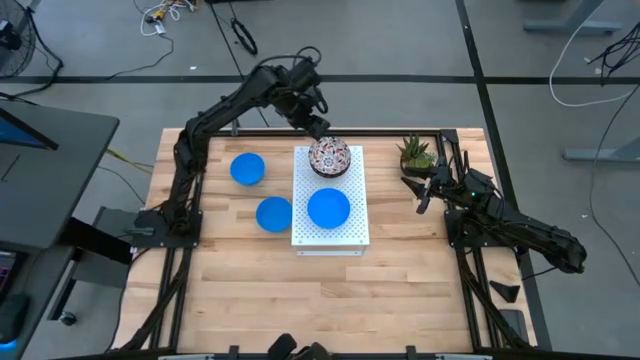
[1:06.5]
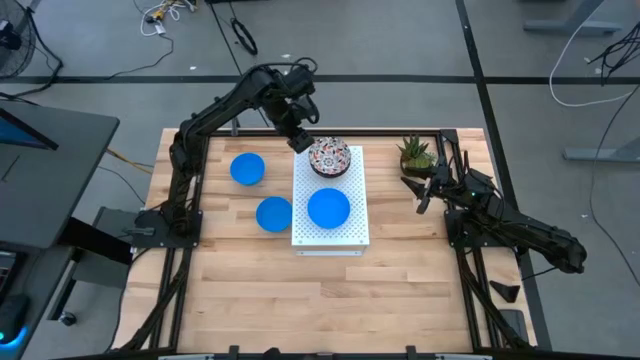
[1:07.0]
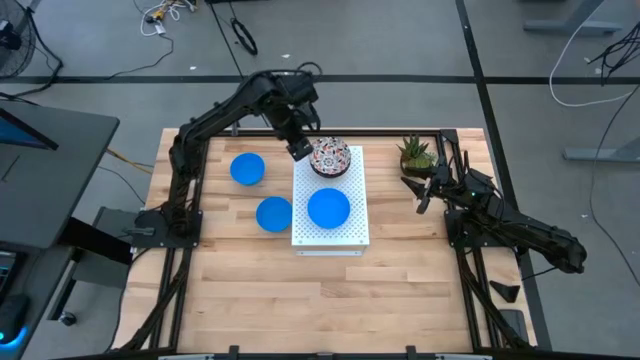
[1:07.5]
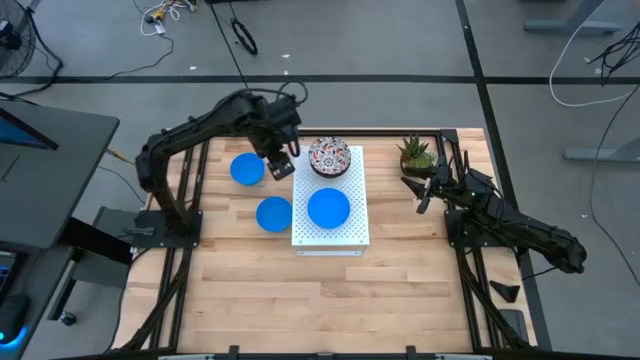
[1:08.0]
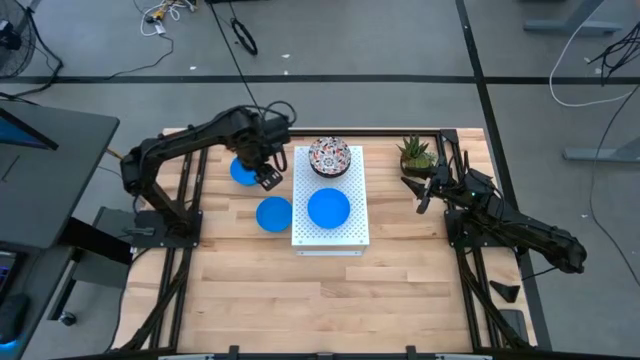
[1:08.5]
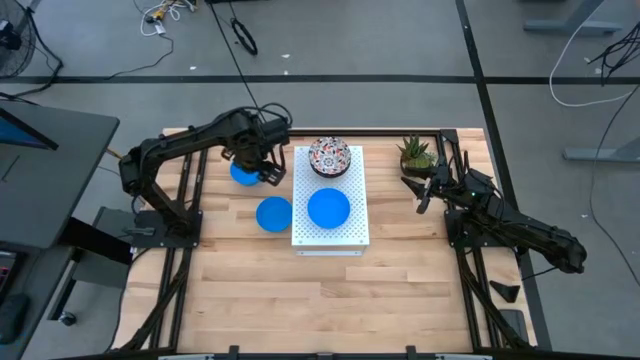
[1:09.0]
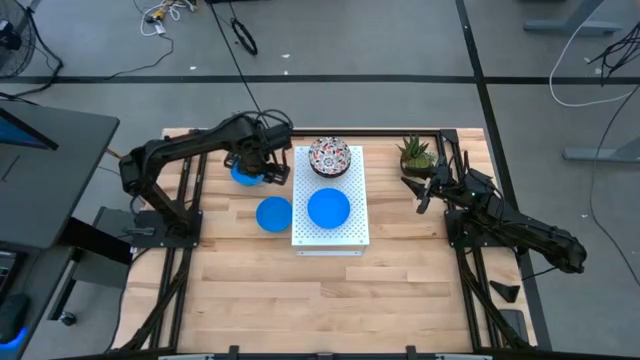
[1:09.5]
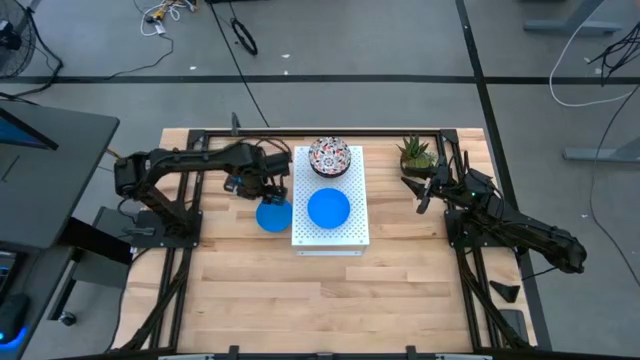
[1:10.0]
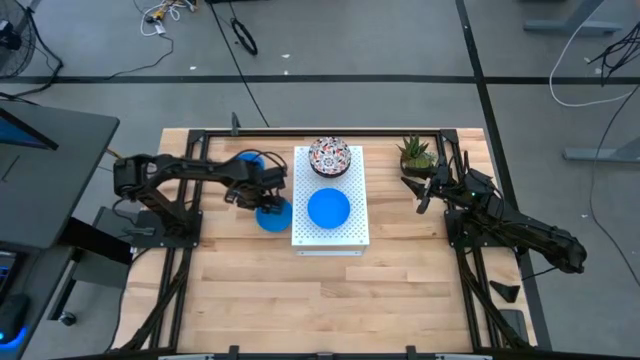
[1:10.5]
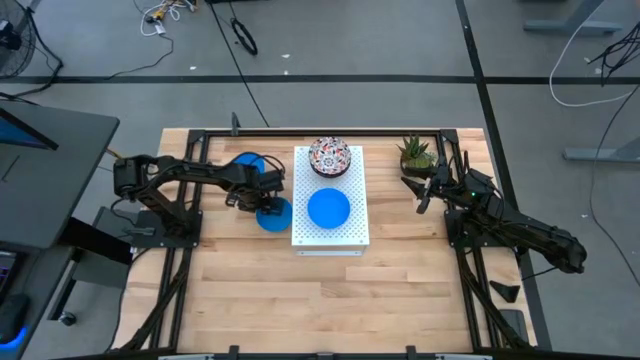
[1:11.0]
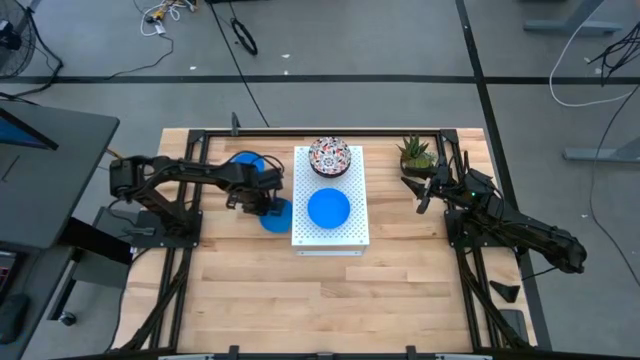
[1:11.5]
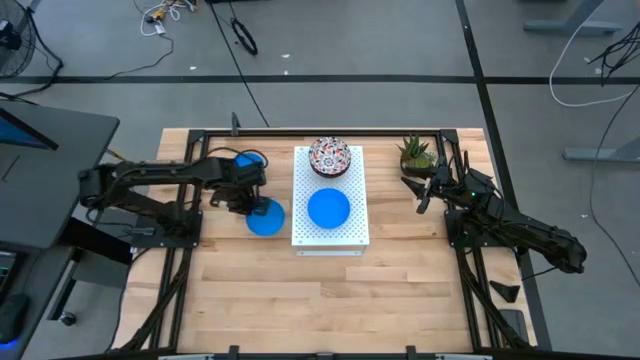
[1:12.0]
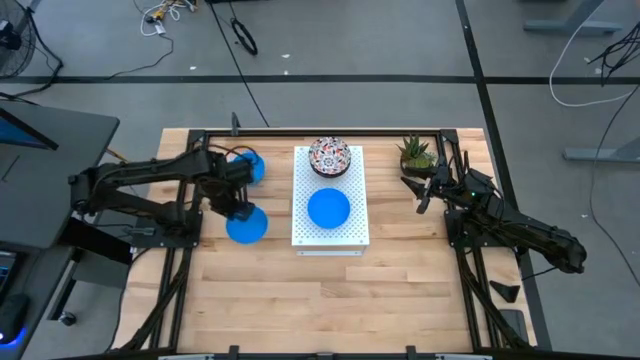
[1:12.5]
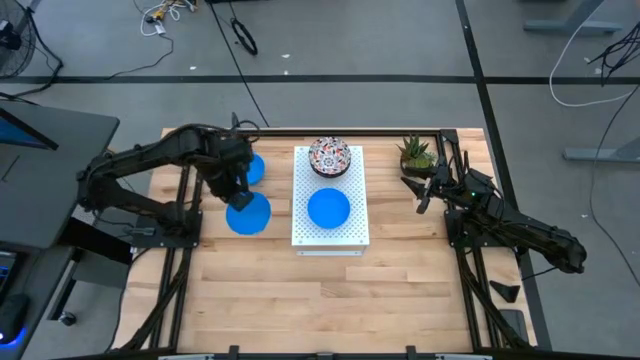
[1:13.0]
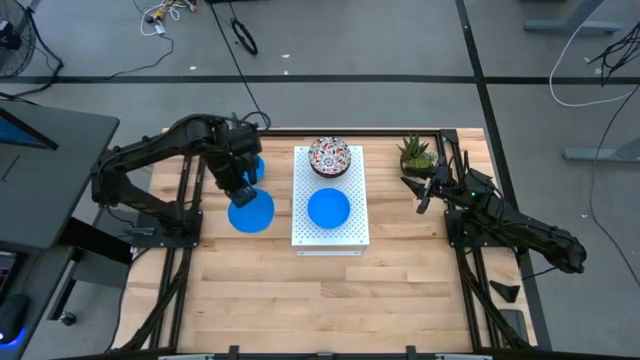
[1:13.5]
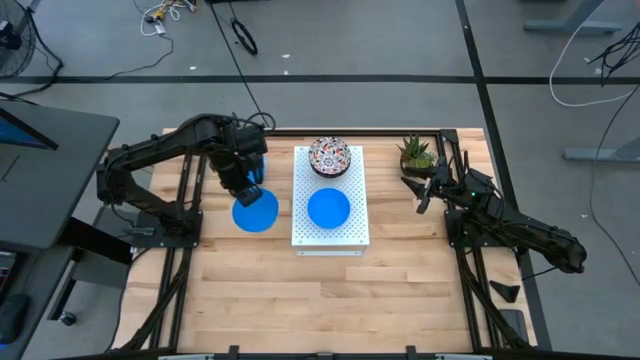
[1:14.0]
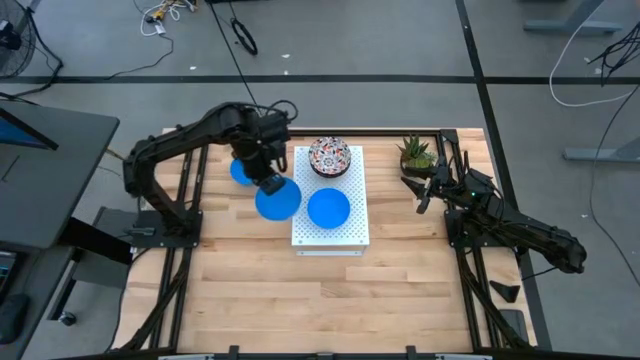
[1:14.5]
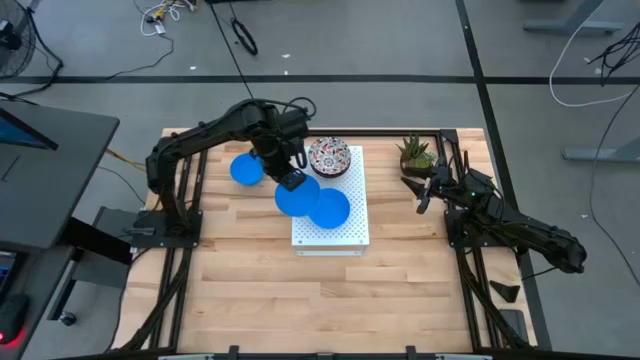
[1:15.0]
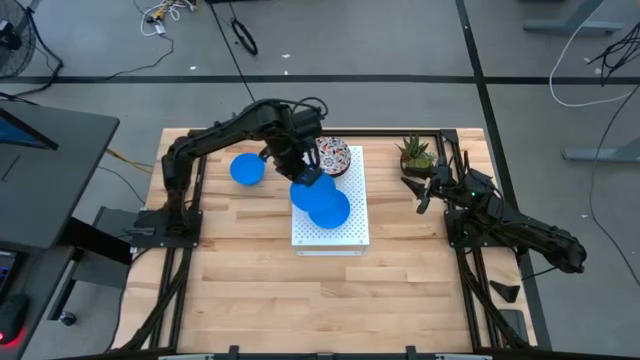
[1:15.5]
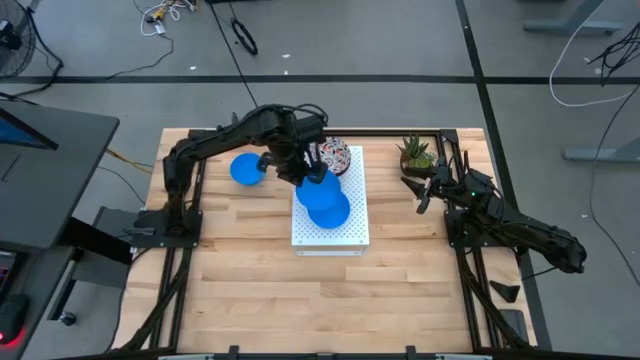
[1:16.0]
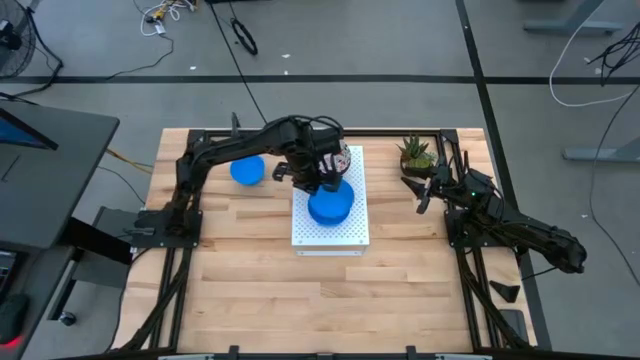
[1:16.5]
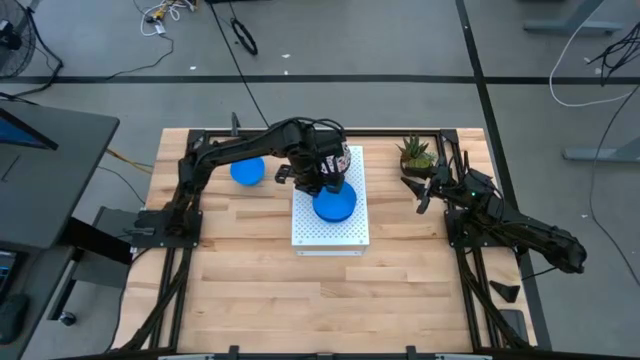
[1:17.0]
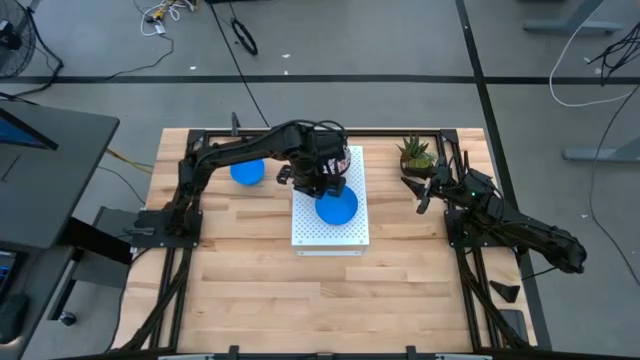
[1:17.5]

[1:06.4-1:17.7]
Task: Pick & Place Mini bowls
Stack the bottom blue bowl on top of the other blue bowl on the shelf

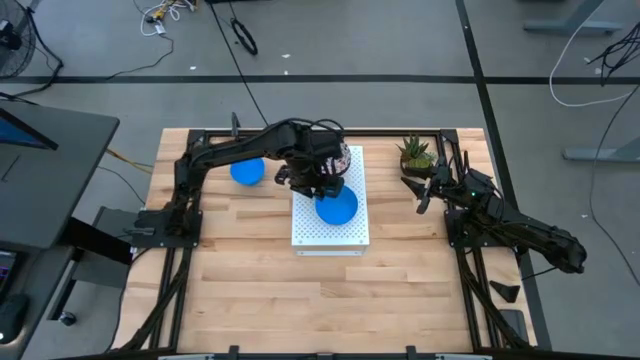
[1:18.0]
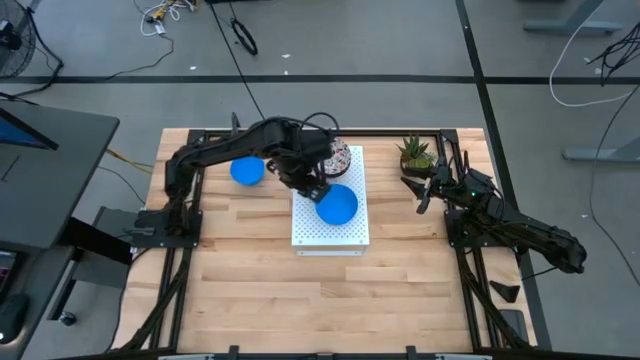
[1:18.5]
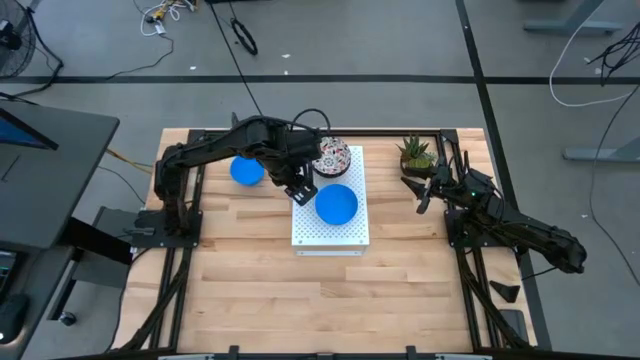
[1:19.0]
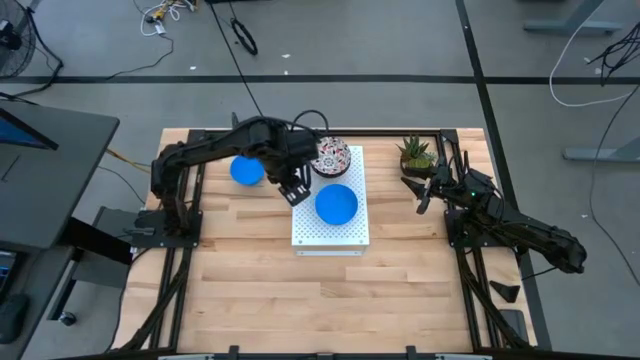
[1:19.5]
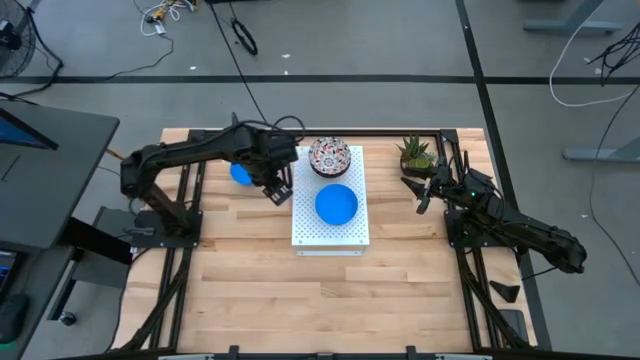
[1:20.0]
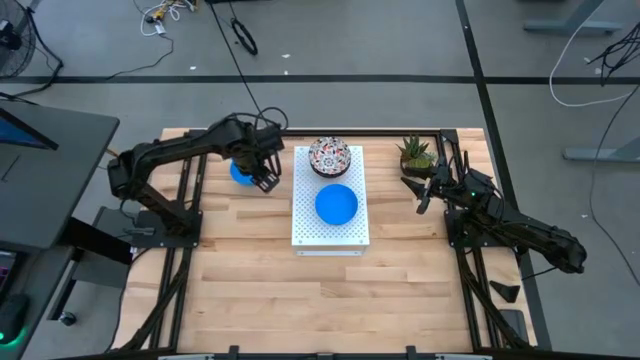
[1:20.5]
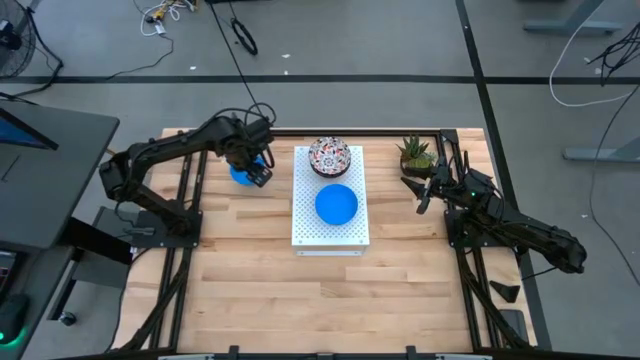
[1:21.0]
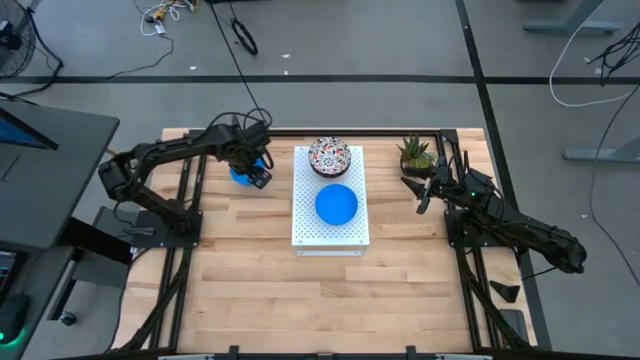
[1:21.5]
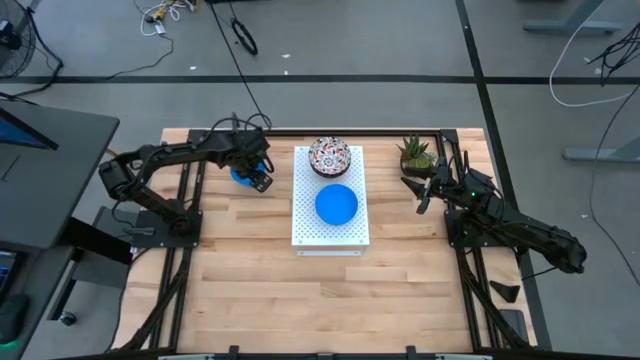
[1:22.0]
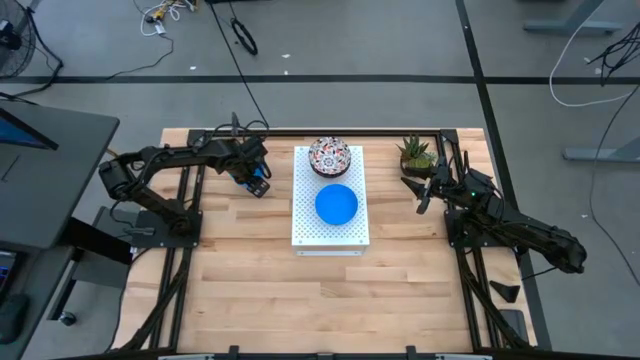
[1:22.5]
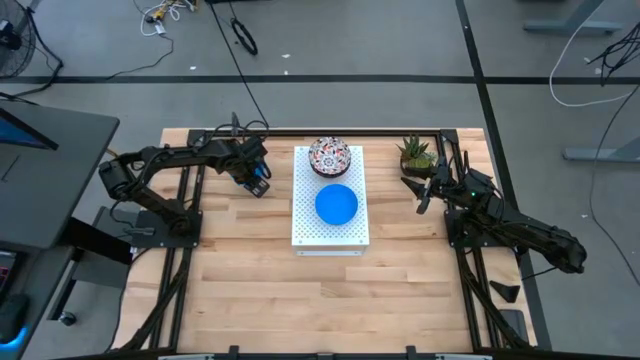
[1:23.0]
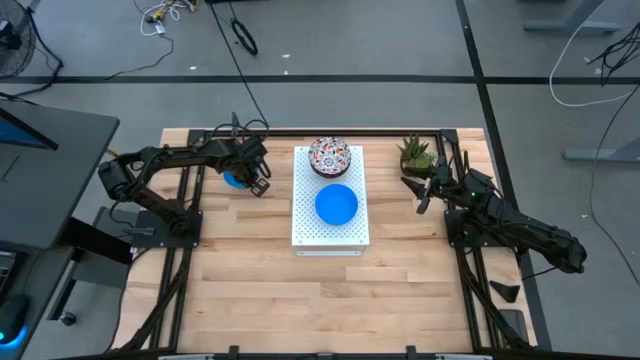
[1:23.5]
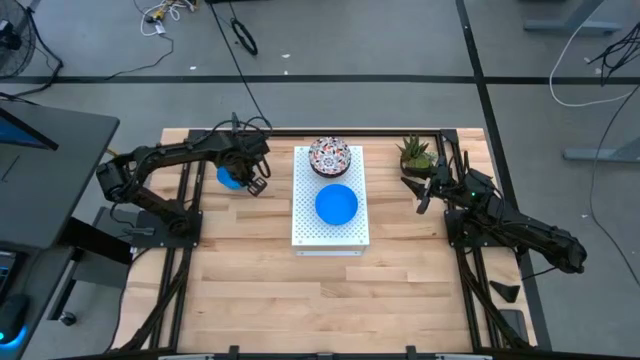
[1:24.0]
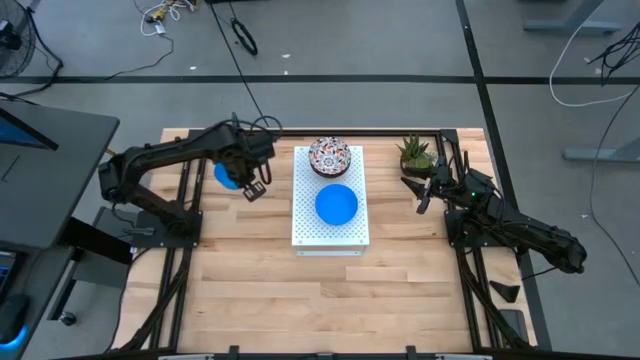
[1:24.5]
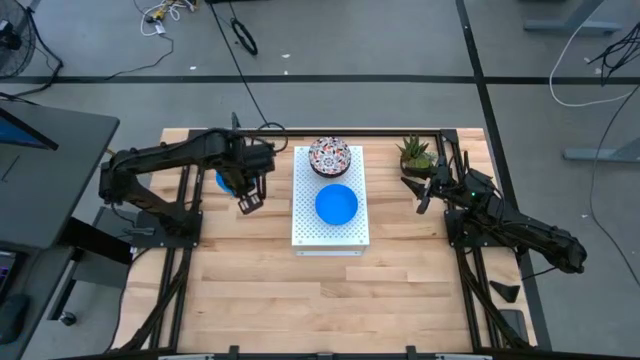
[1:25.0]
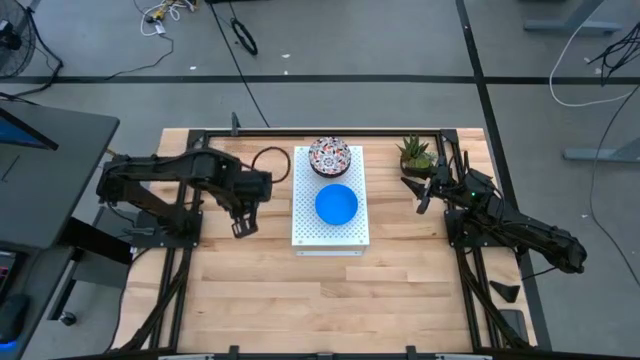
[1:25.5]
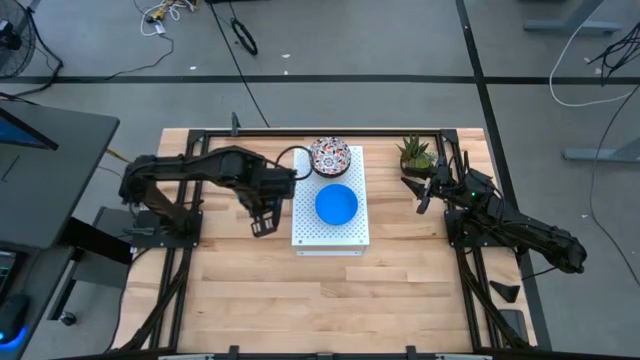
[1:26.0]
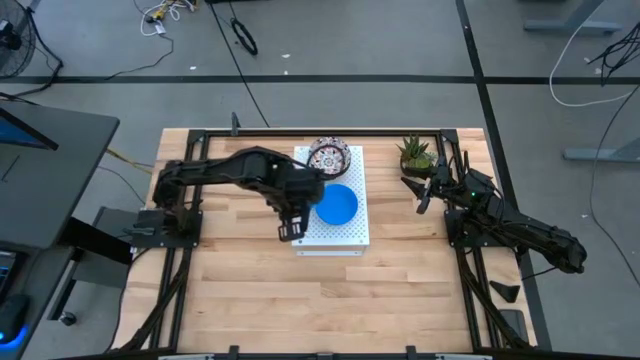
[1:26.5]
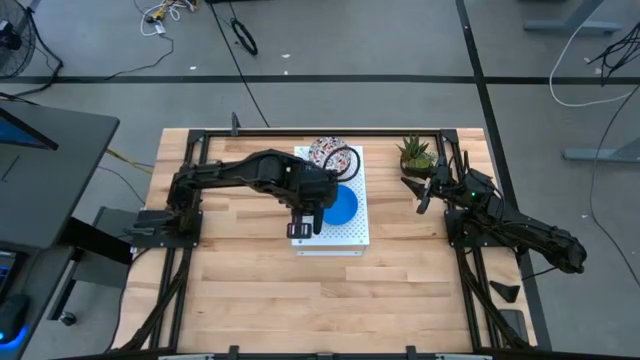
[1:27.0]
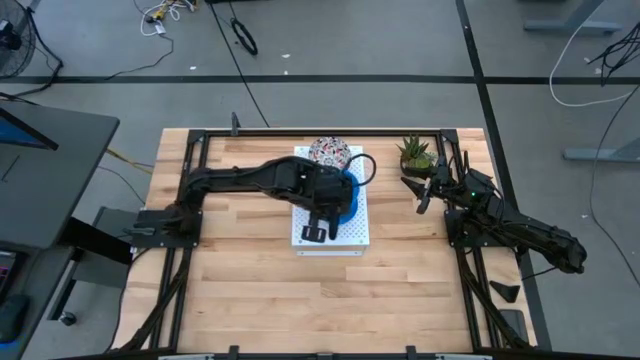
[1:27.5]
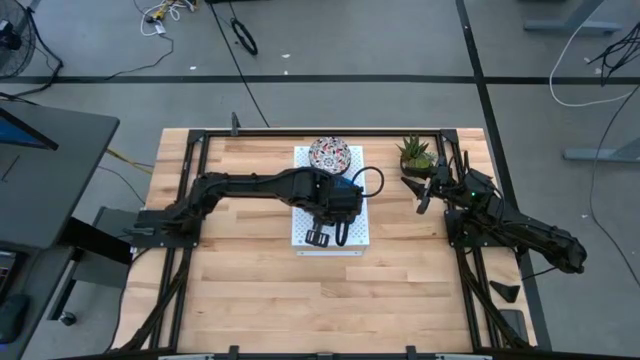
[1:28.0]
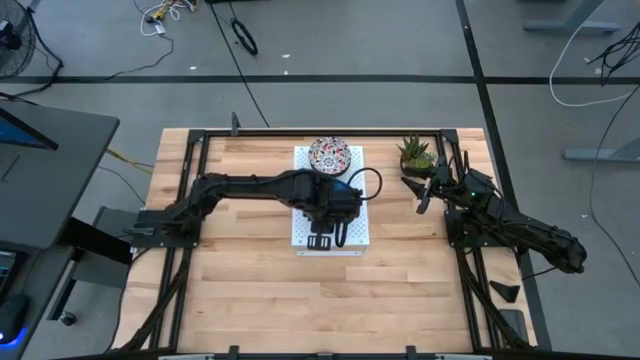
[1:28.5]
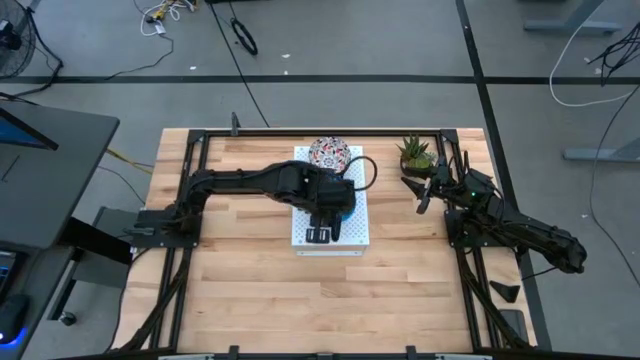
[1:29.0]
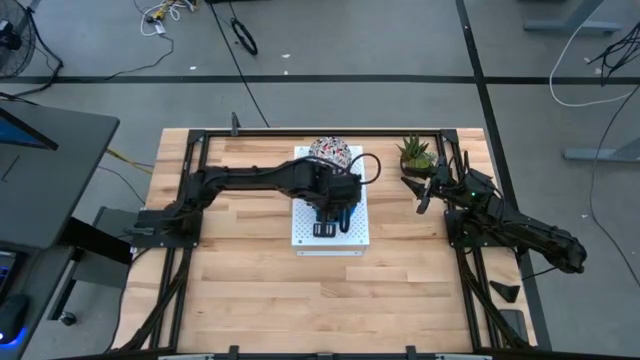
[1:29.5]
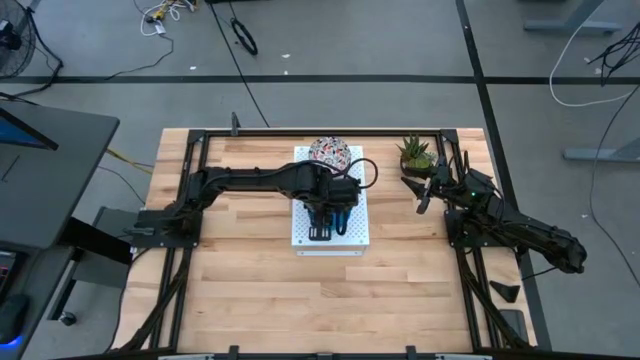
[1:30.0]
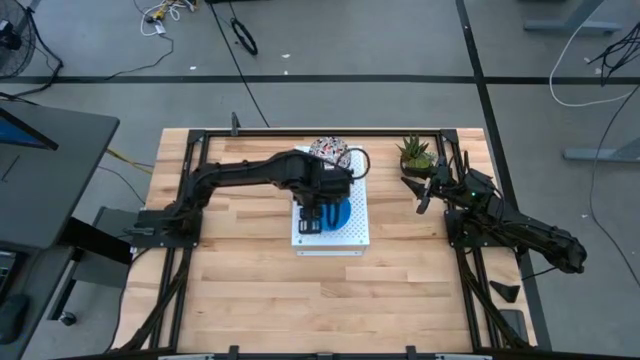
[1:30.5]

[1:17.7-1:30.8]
Stack the blue bowl on top of the other blue bowl on the shelf
